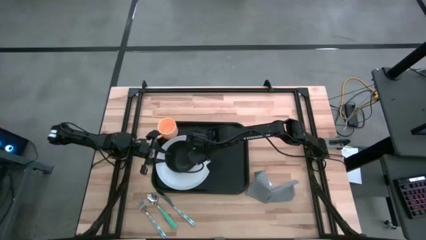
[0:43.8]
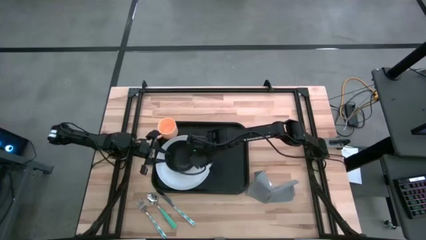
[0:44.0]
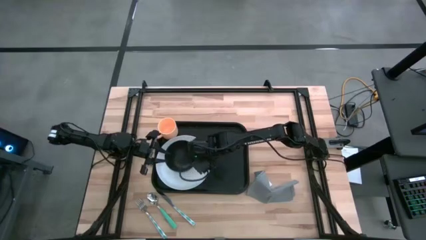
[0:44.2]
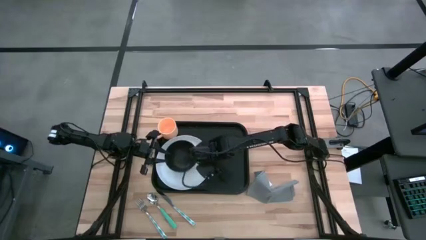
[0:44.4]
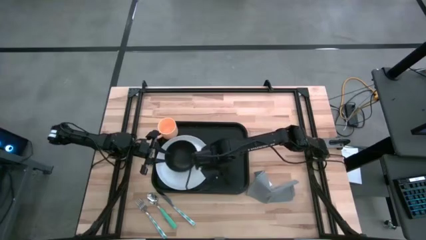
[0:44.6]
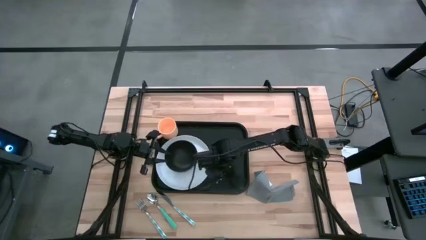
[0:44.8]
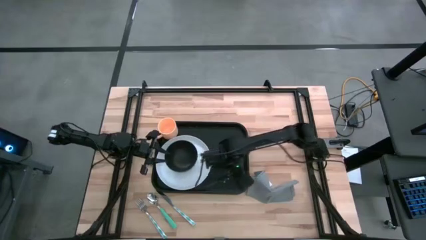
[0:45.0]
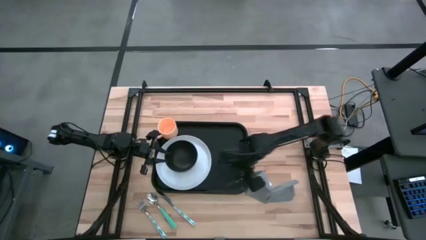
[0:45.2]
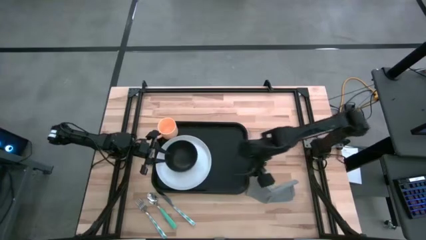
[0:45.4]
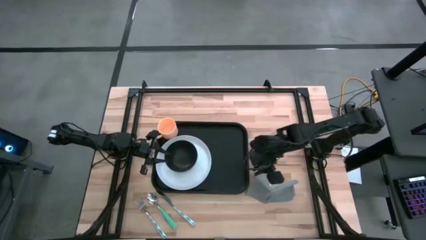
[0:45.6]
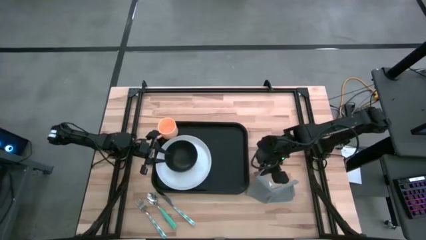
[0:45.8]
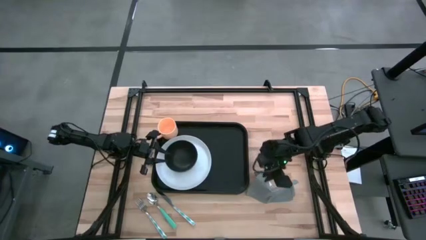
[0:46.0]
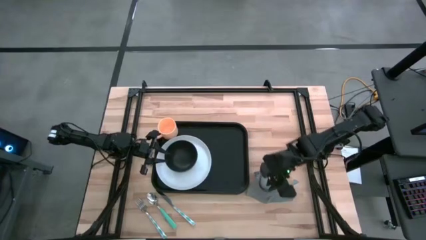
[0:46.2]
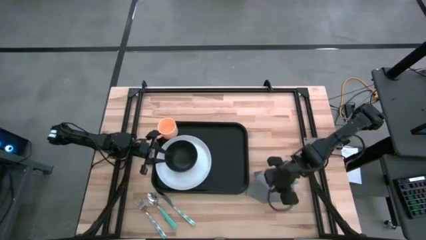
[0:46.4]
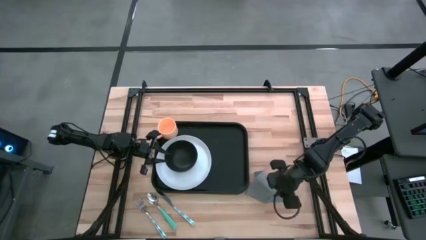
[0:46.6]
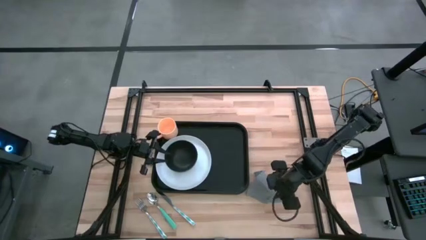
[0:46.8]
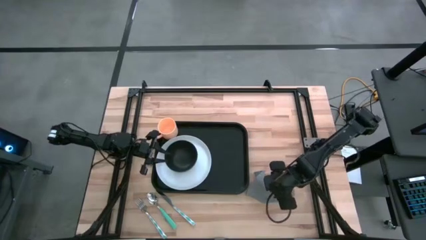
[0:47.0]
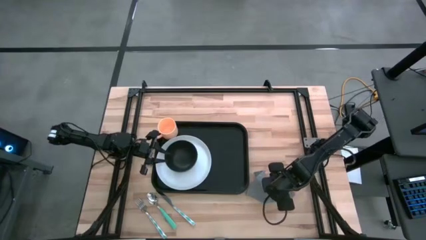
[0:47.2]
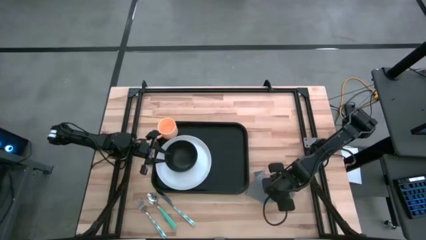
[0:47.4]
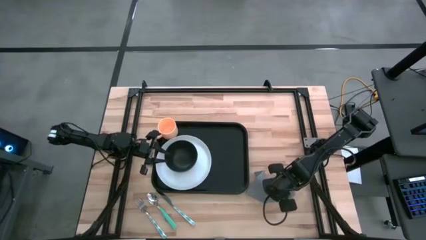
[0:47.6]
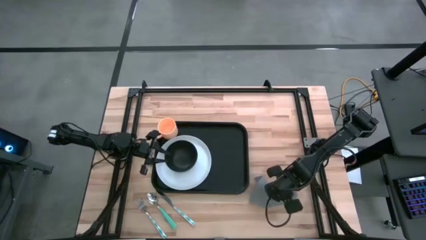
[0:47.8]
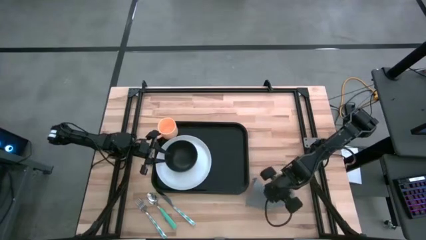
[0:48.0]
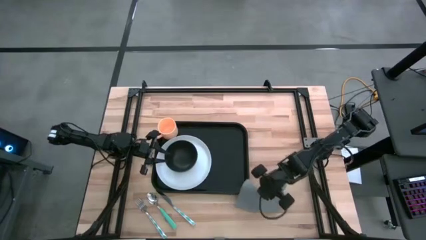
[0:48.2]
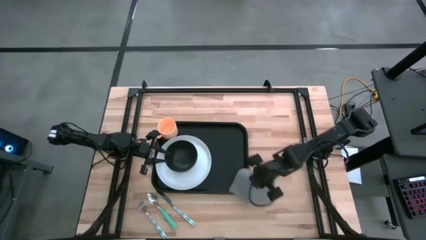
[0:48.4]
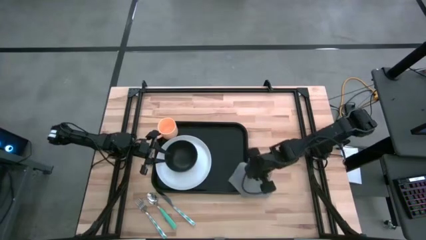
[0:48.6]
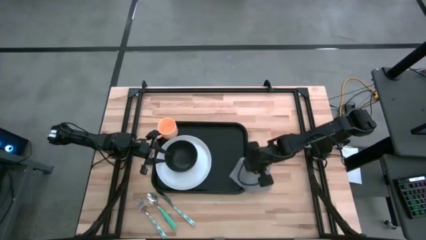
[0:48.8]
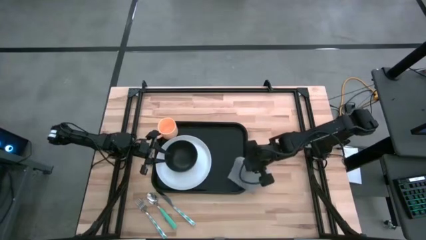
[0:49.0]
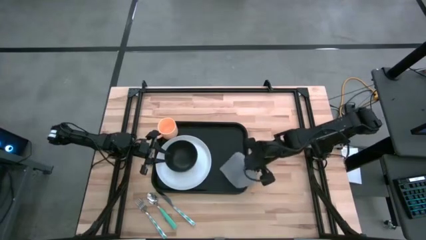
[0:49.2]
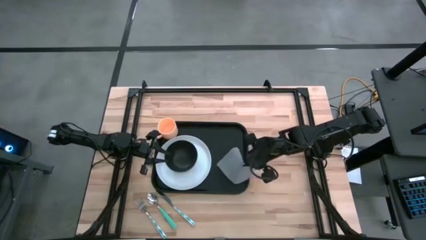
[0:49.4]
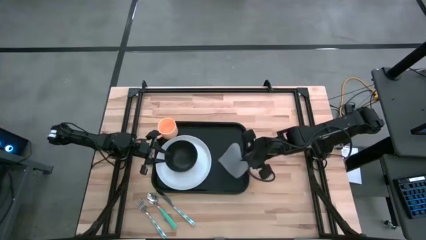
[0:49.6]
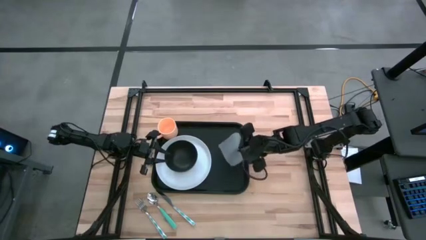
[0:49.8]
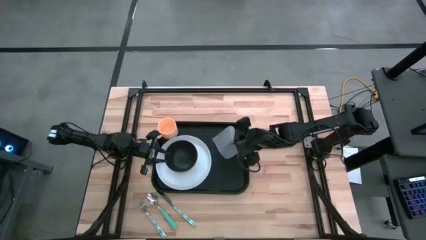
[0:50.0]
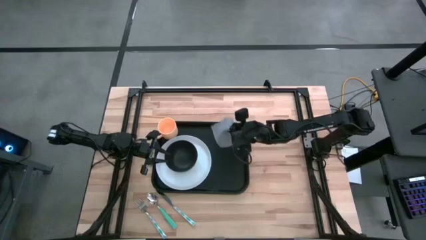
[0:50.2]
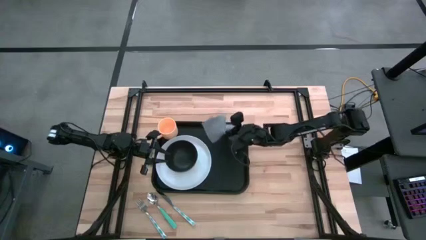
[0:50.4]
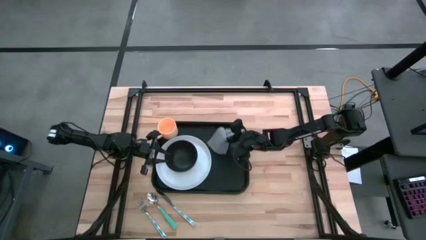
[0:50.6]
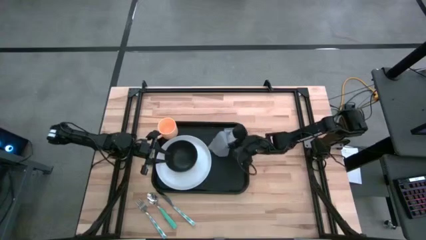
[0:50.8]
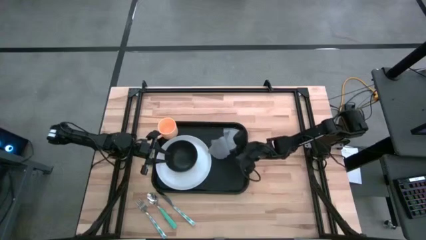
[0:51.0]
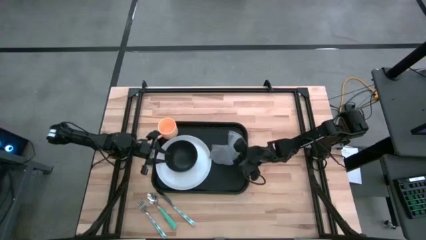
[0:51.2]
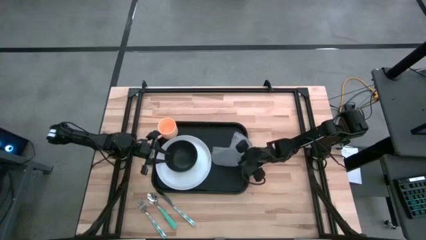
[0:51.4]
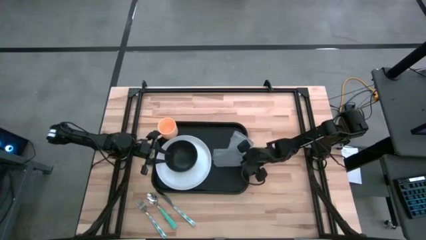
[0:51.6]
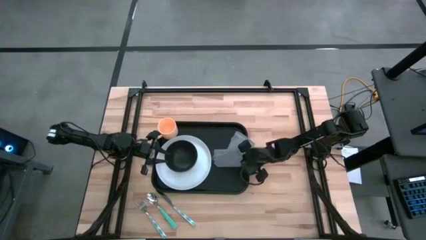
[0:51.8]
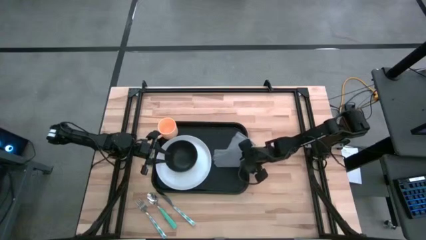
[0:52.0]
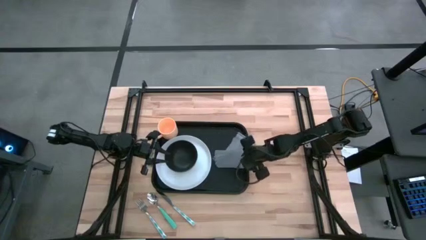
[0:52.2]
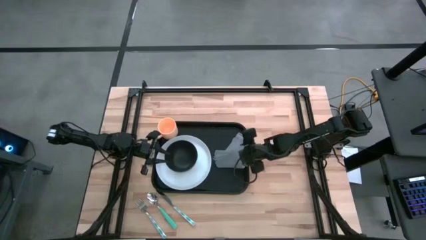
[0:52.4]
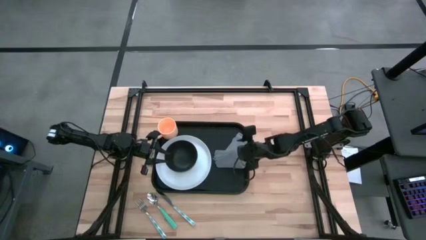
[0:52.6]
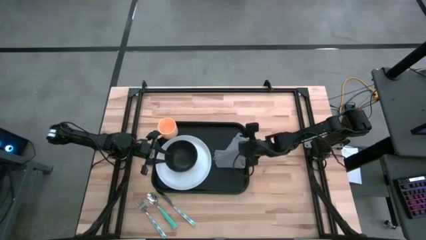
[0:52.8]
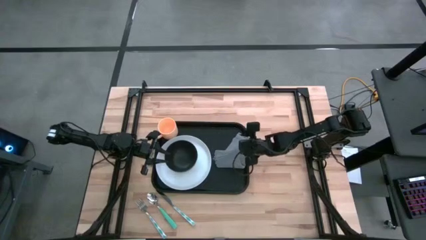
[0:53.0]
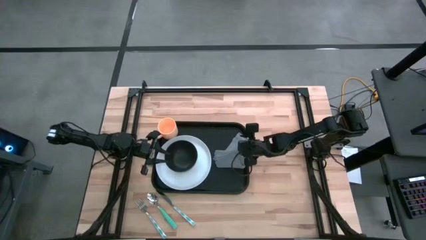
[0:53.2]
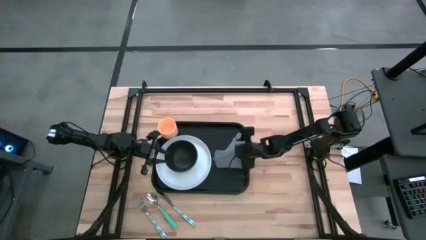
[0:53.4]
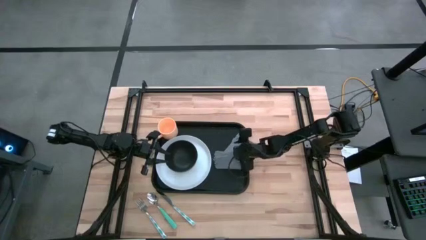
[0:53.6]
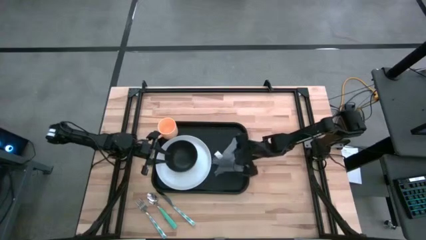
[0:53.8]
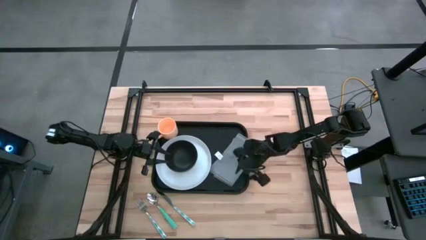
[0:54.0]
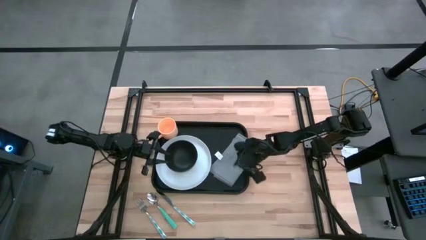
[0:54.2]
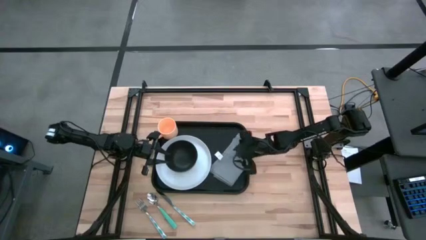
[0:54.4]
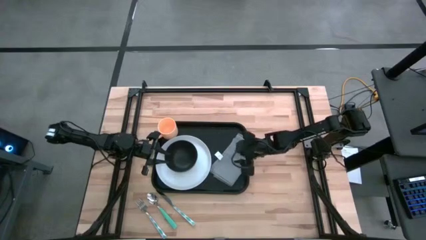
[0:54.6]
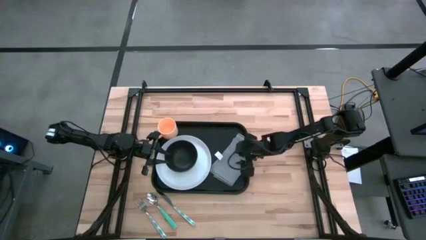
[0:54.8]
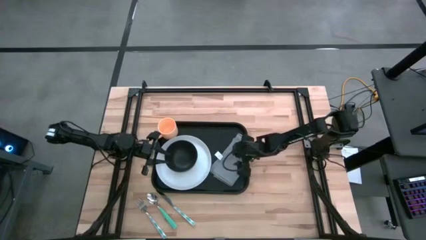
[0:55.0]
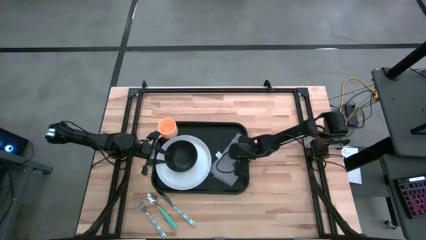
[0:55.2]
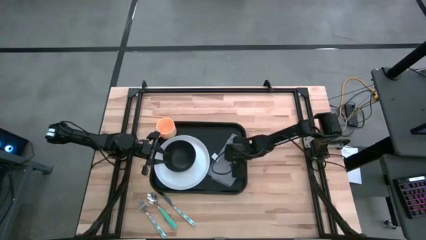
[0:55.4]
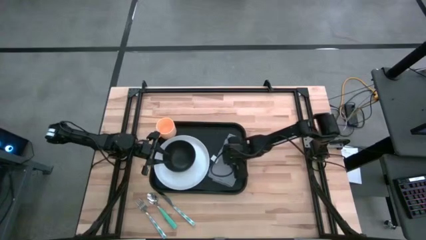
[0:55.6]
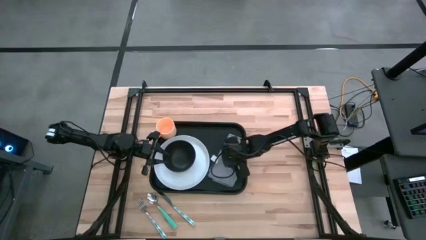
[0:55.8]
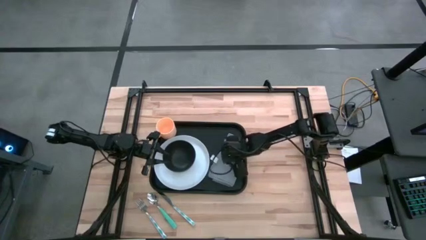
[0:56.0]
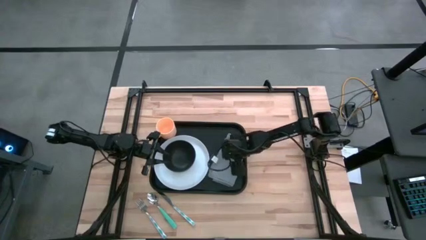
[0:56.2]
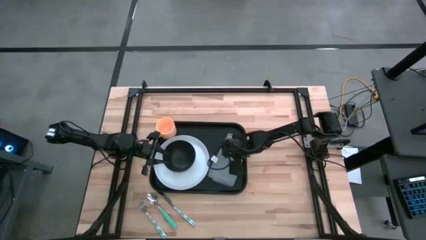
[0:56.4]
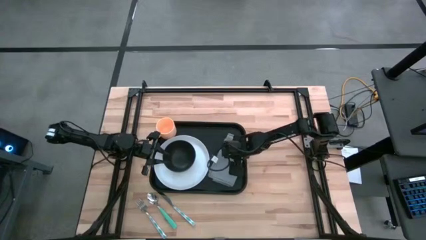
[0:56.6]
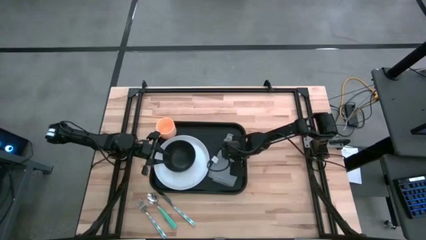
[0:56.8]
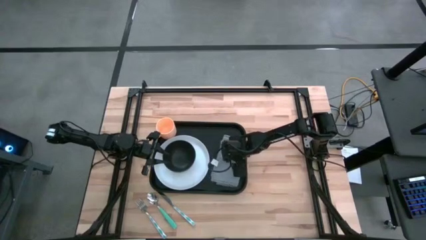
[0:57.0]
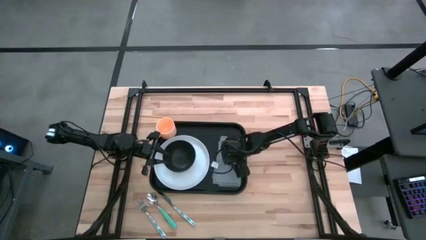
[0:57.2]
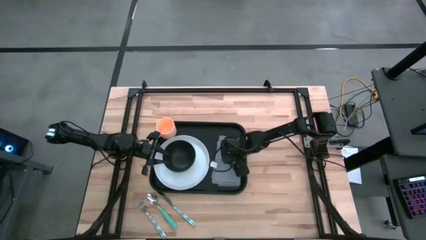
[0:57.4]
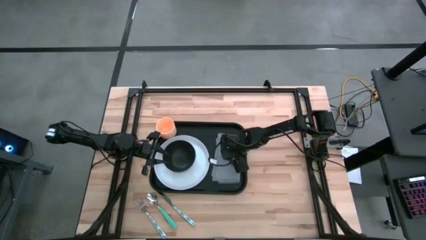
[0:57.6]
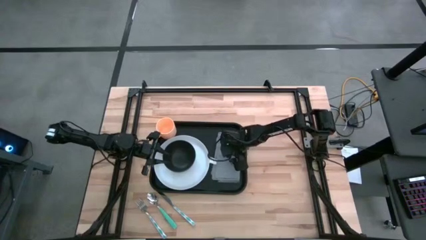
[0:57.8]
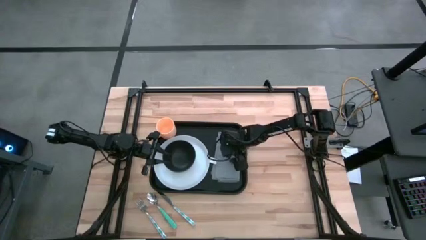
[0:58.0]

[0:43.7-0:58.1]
Task: Set up tray
Put the gray napkin on the black serving tray to the right of the white plate

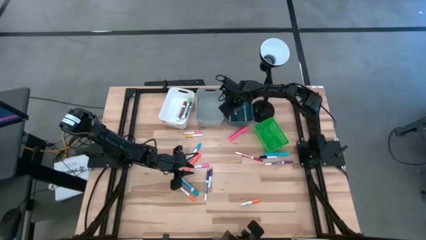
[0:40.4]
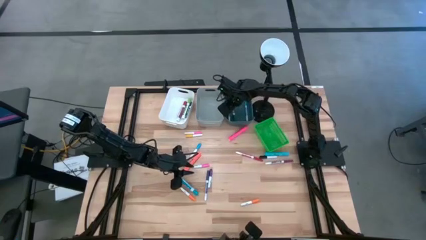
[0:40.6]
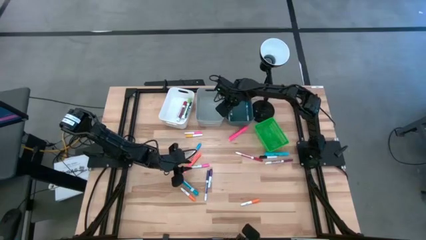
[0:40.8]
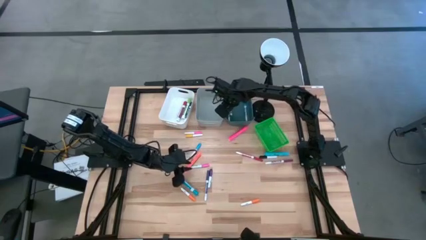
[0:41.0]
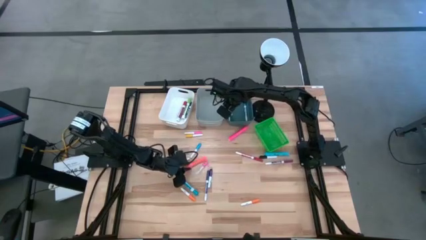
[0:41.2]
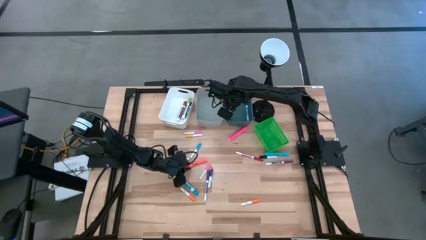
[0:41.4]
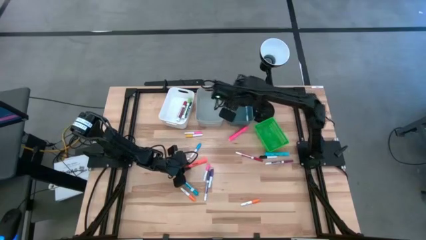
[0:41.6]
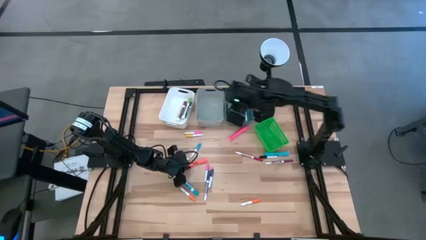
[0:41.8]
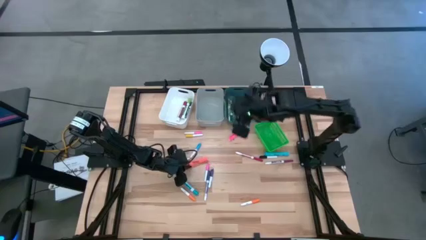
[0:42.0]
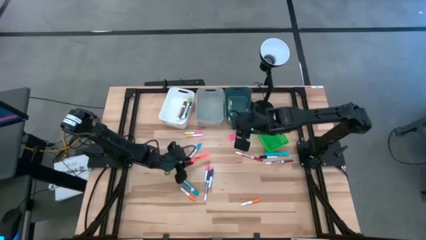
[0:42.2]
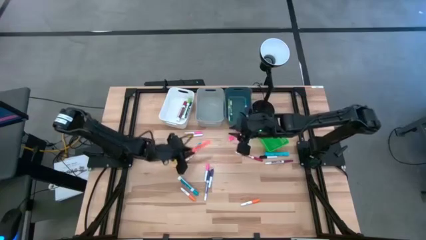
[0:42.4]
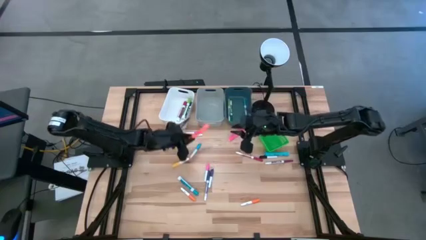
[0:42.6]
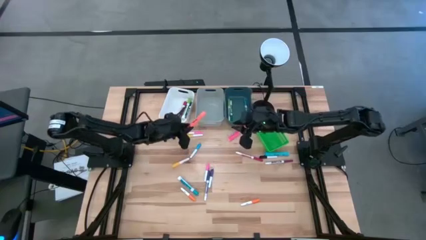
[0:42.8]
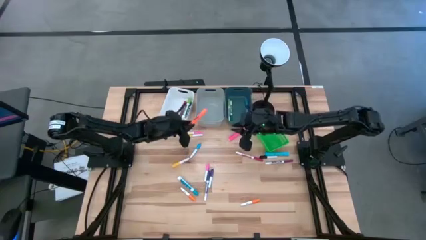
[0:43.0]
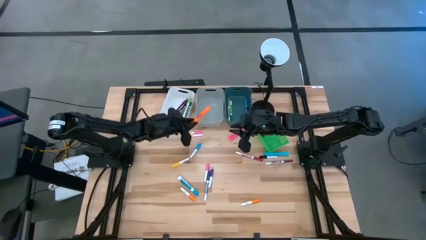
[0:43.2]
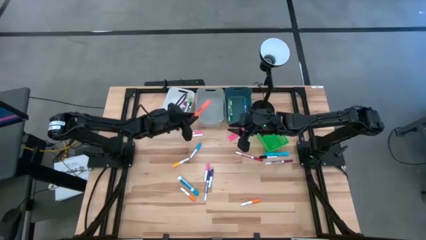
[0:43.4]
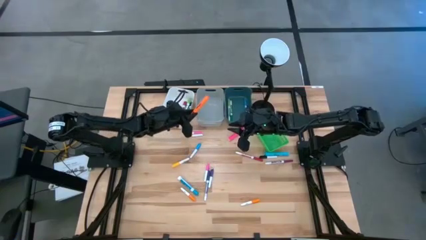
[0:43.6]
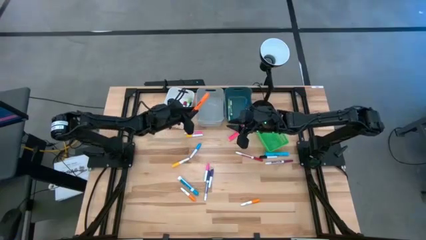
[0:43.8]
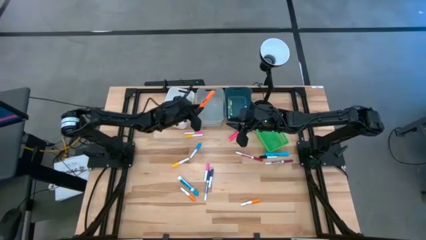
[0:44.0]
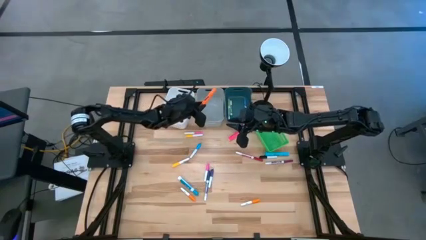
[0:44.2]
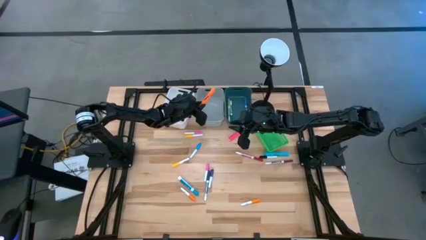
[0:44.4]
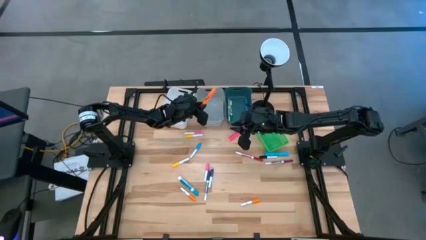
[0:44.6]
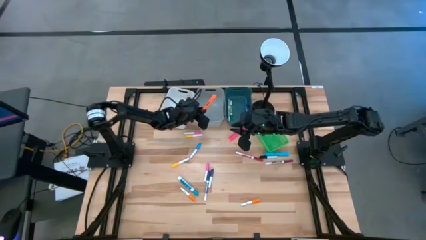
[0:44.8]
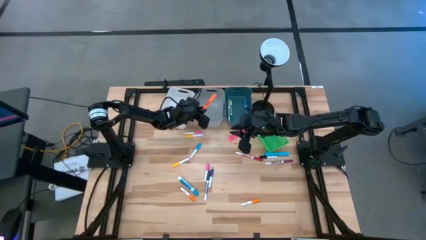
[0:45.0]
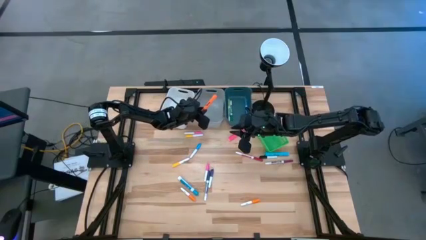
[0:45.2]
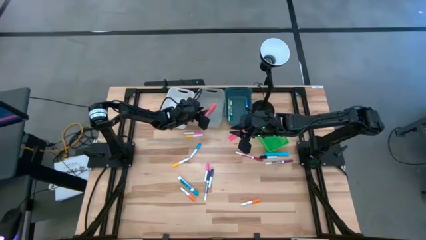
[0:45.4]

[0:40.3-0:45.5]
Task: Pick & Place Markers
Put the orange highlighter pen into the gray bin
